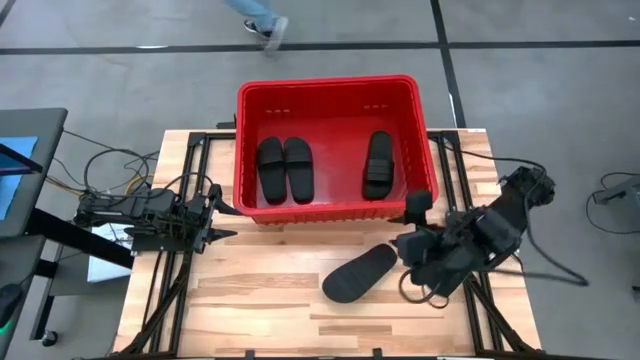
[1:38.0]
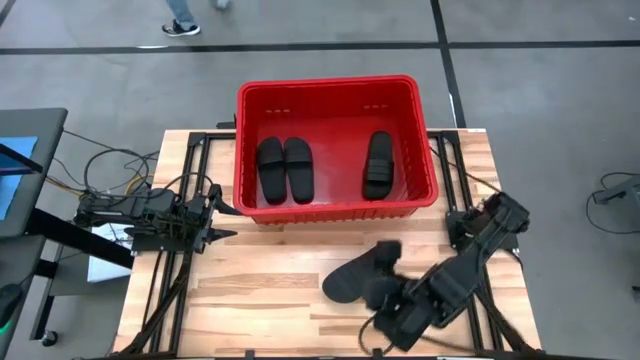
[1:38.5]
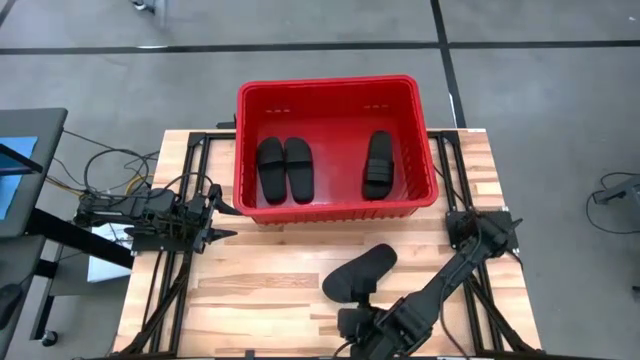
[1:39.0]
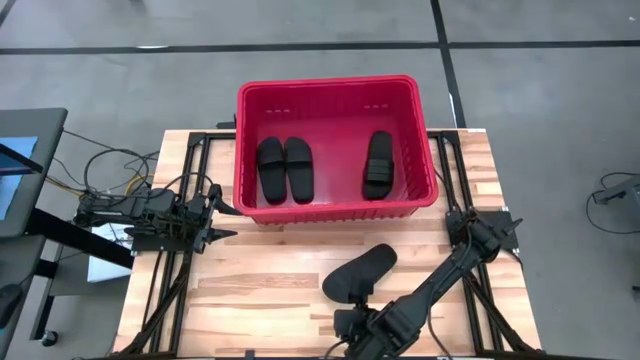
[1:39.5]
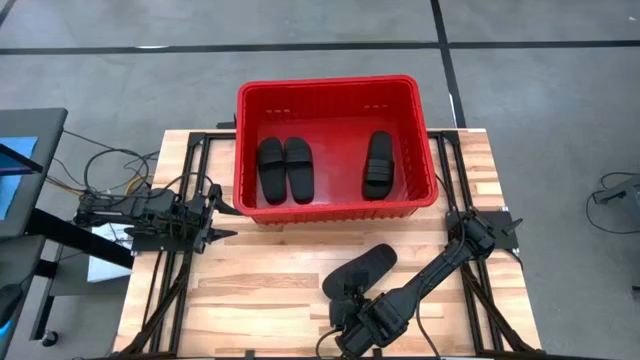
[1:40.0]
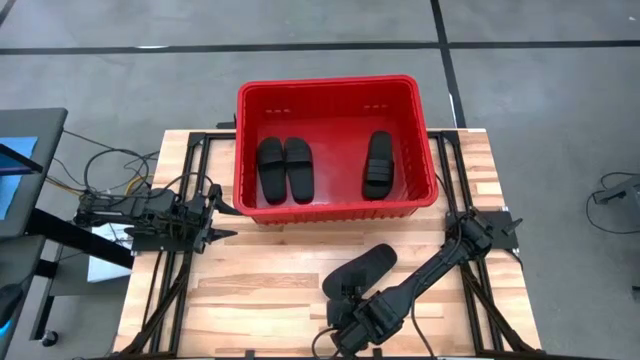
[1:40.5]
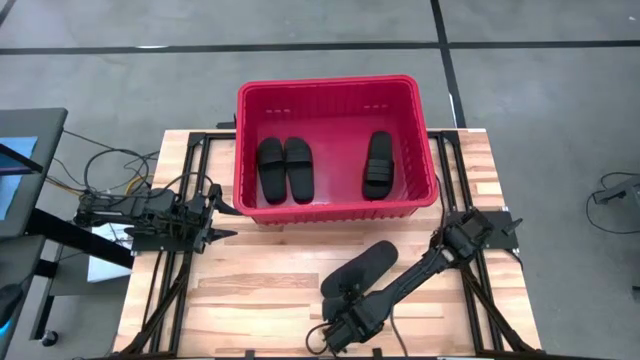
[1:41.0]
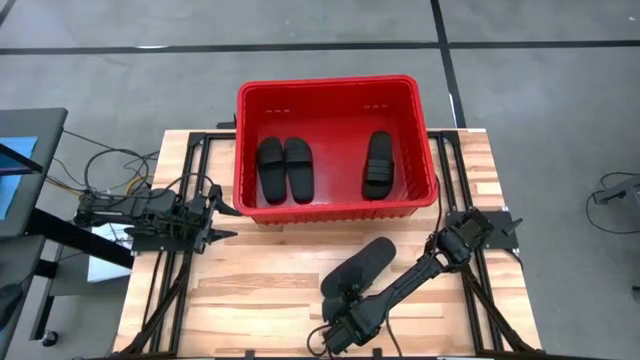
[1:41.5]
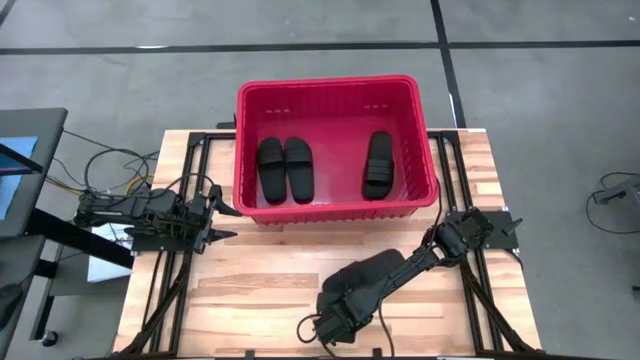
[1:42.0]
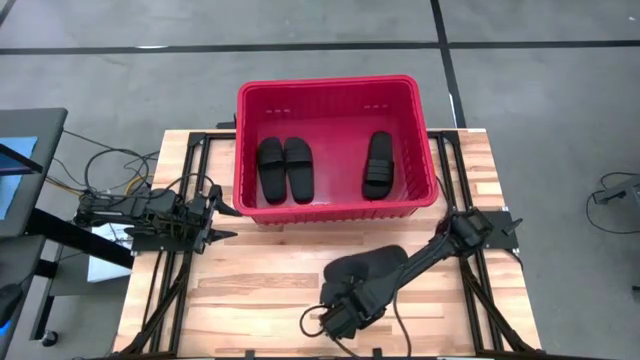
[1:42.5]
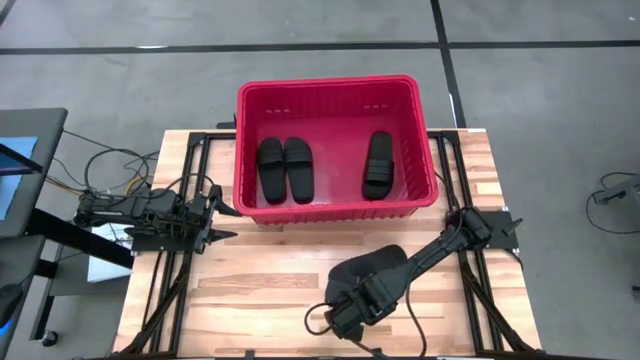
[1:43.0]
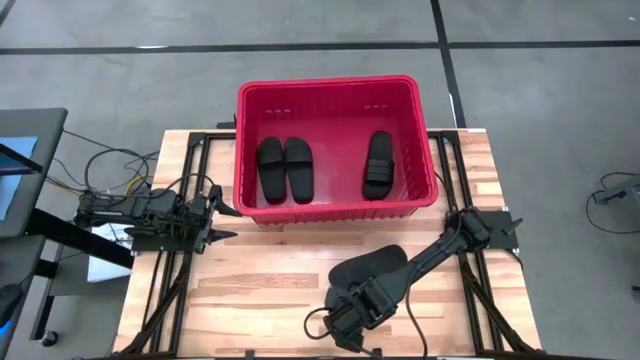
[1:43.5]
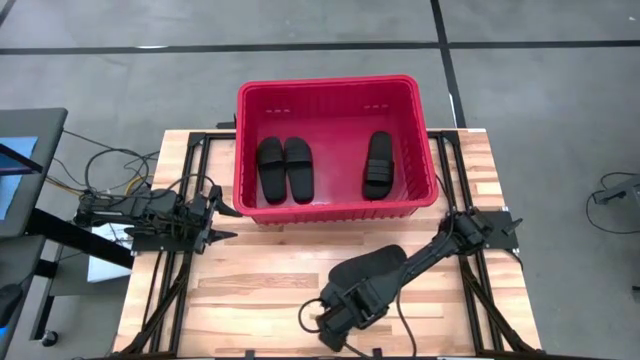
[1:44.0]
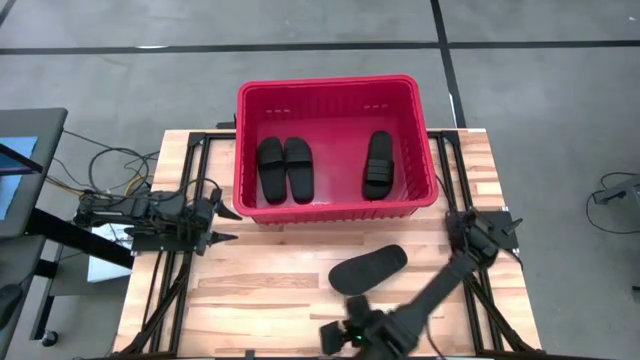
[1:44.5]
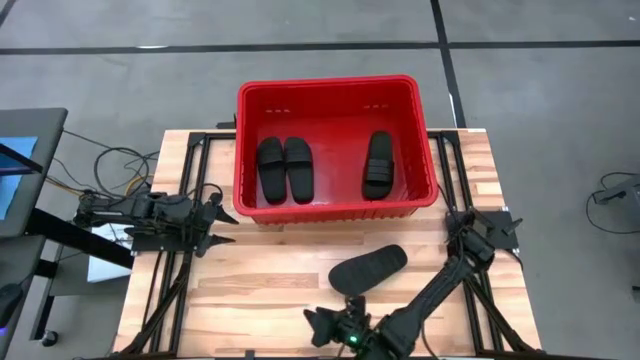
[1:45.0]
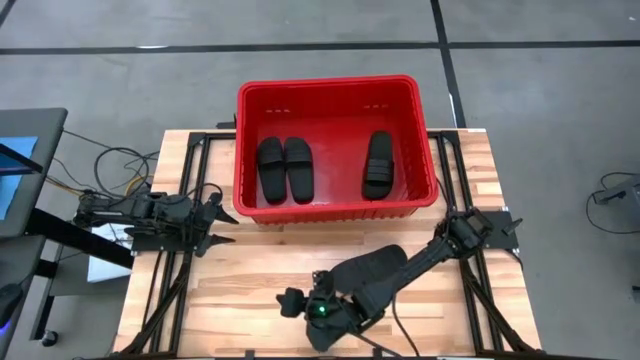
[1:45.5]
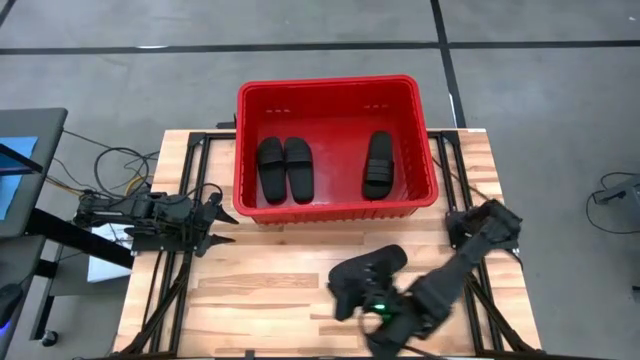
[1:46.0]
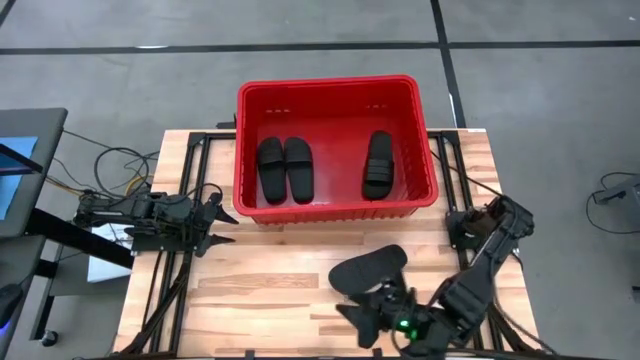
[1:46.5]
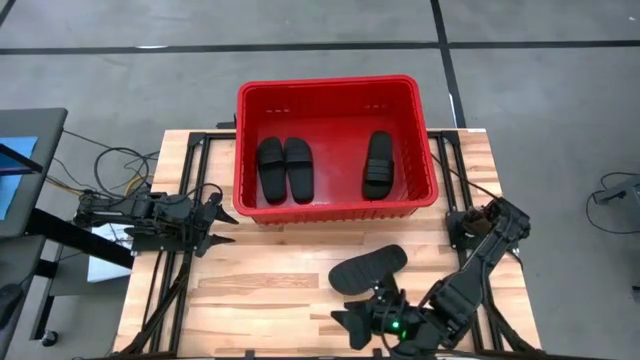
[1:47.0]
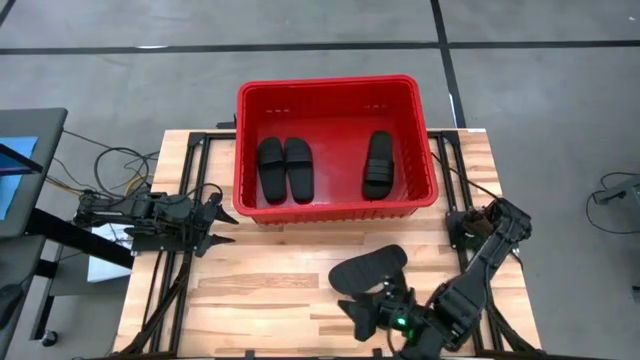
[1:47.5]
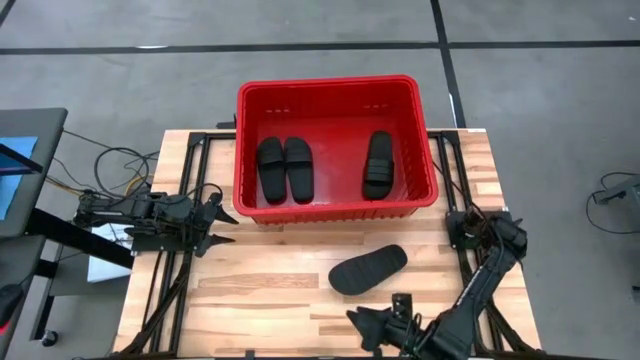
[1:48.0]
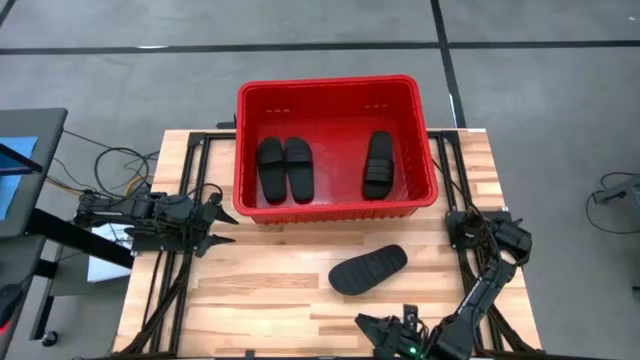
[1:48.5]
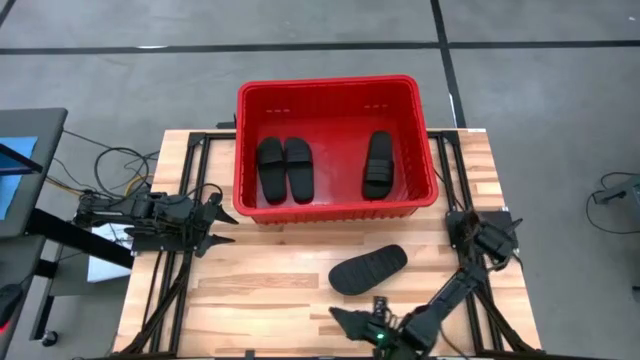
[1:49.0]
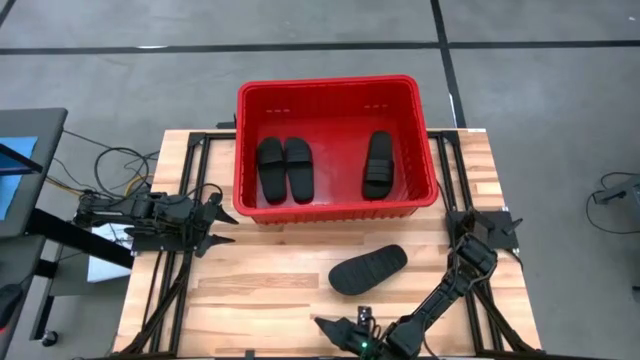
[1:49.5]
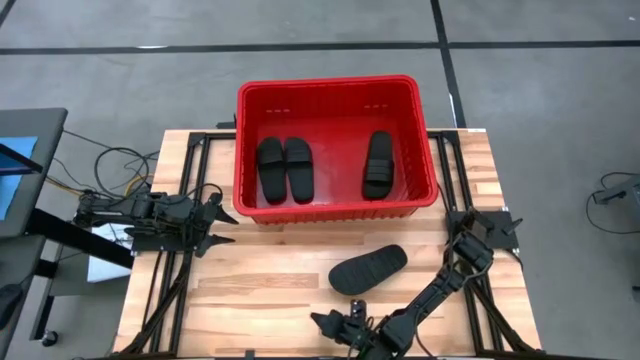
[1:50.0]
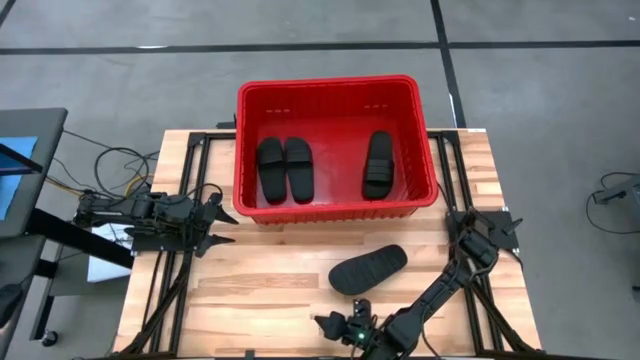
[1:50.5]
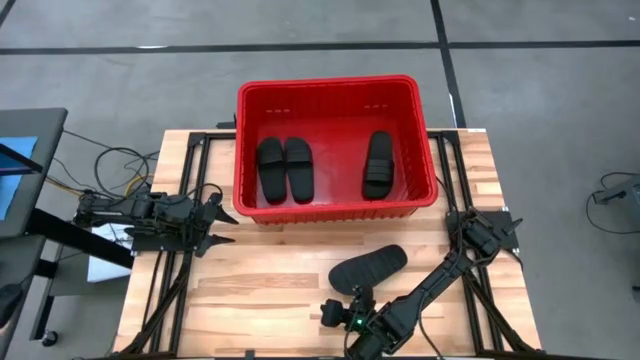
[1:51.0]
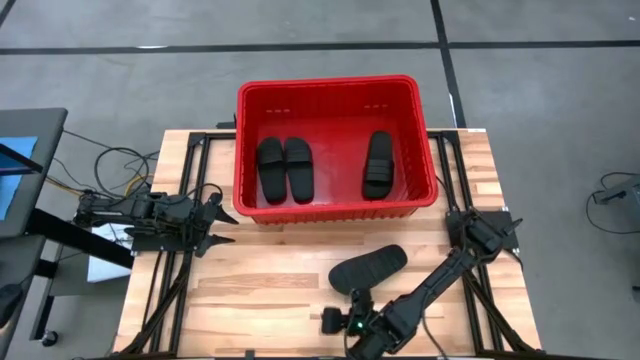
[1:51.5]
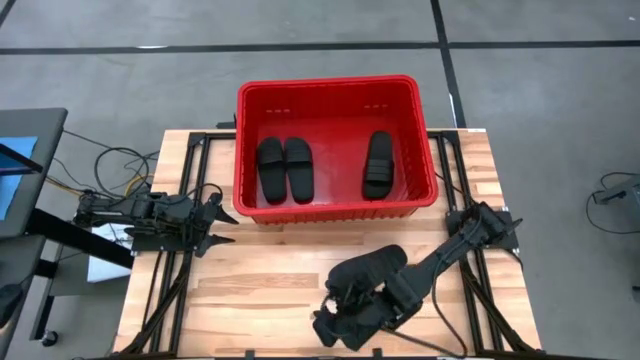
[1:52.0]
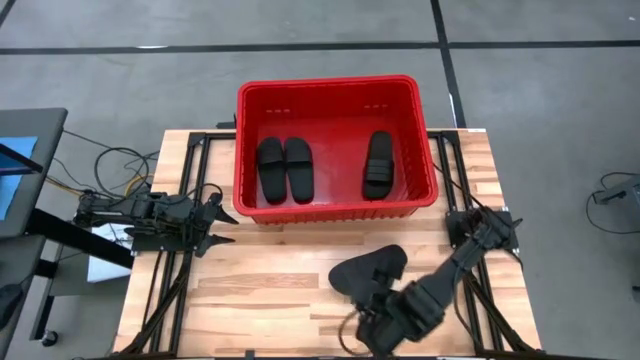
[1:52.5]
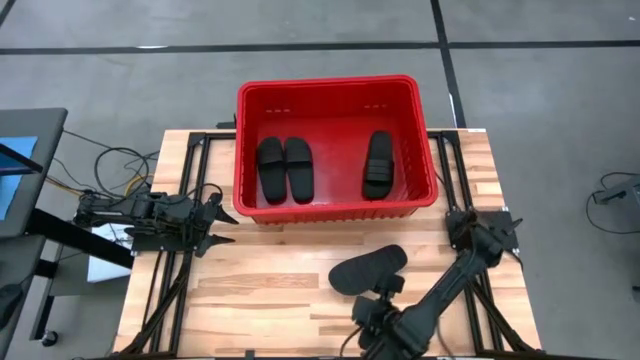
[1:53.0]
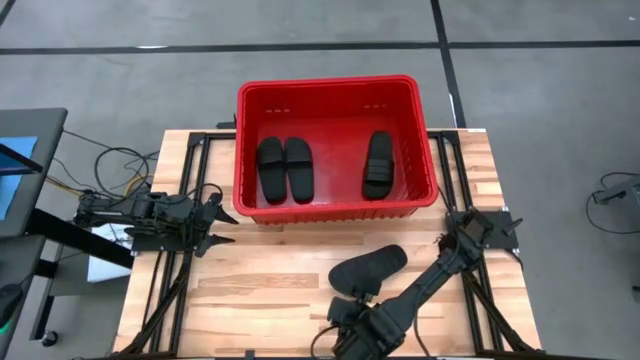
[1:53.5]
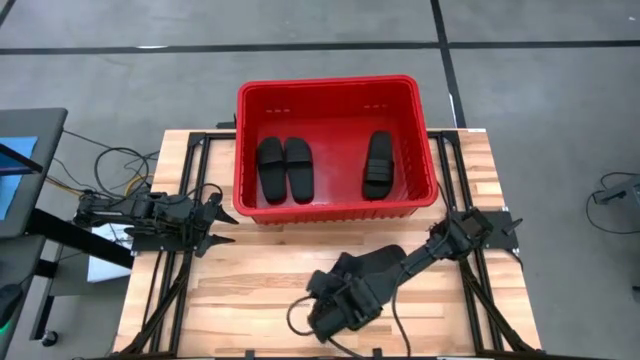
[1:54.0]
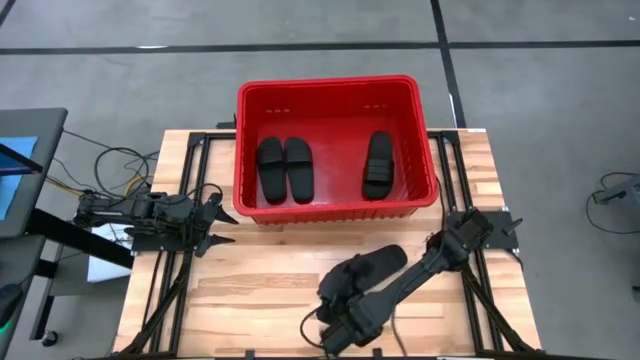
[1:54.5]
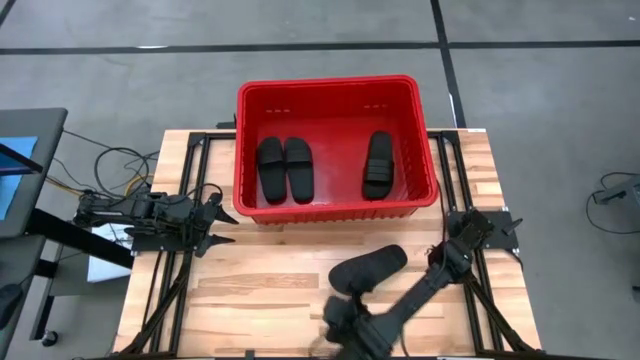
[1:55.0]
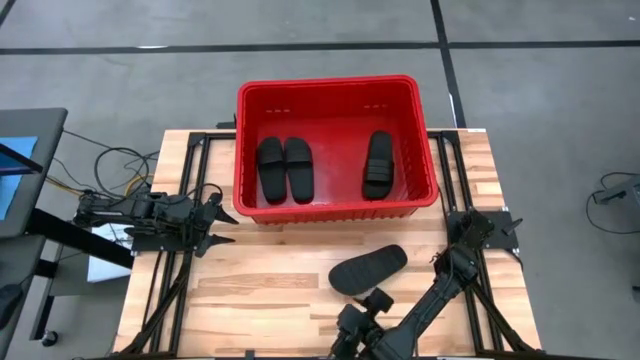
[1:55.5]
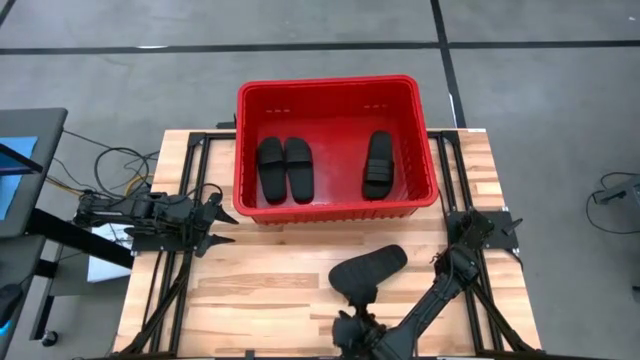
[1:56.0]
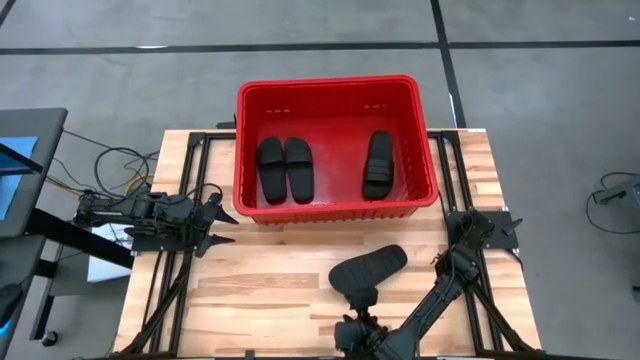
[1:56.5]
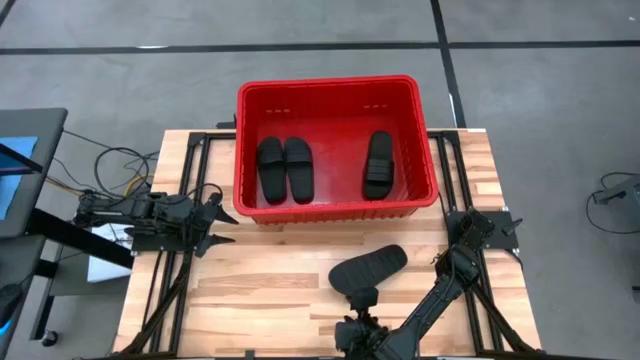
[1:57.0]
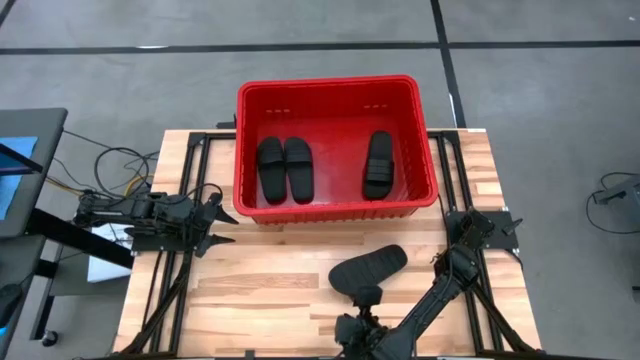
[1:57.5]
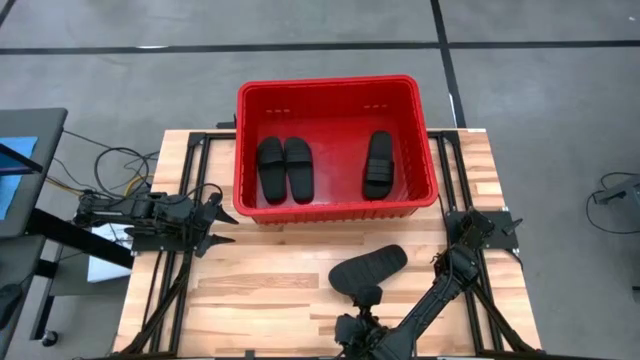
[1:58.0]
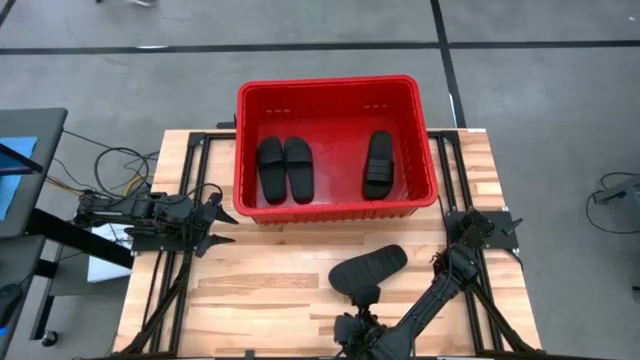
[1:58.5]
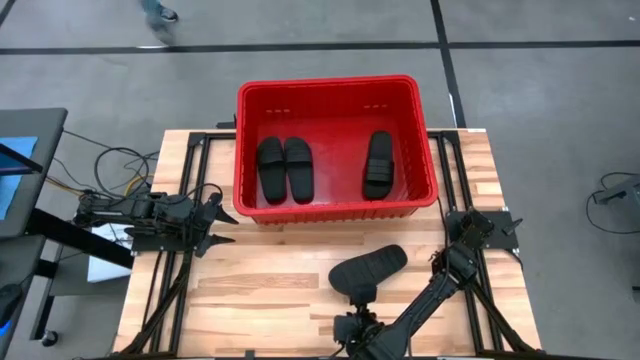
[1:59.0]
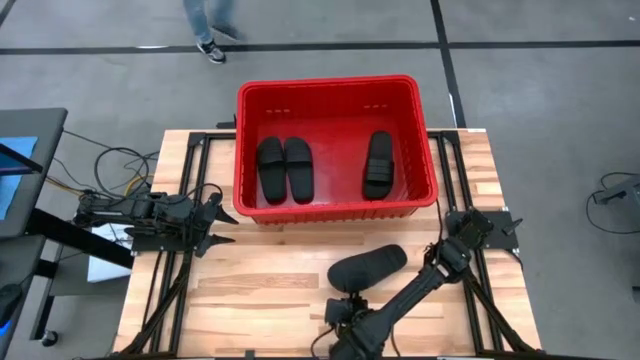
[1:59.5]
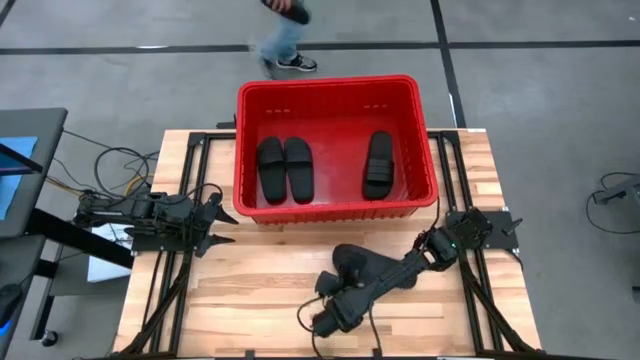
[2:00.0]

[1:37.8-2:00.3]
Task: Pick and place slides into bin
Put the black slides into the red bin
